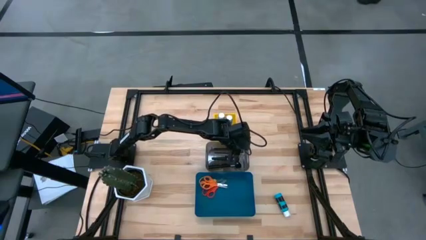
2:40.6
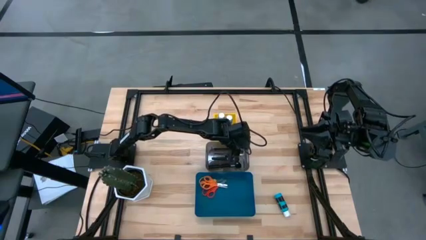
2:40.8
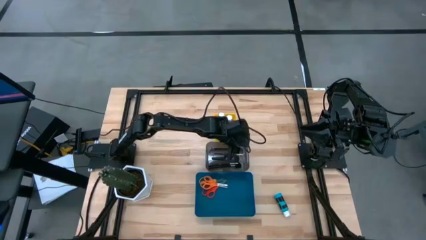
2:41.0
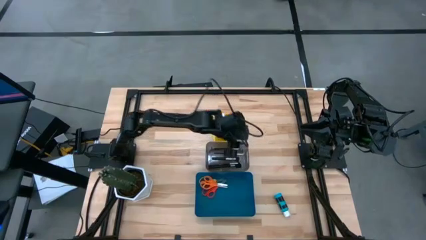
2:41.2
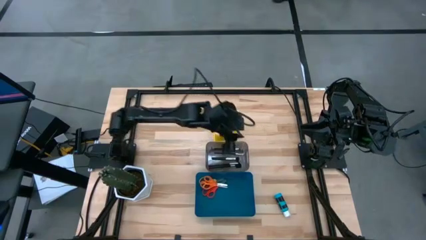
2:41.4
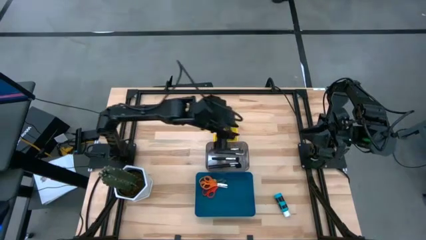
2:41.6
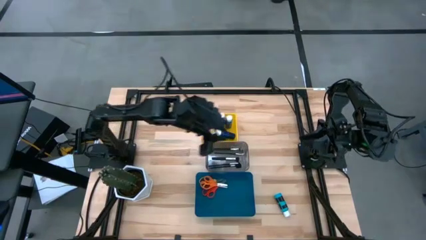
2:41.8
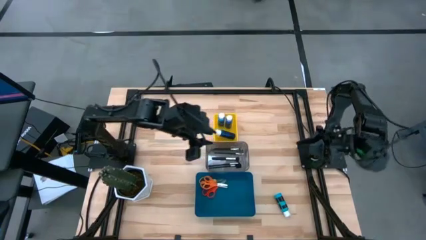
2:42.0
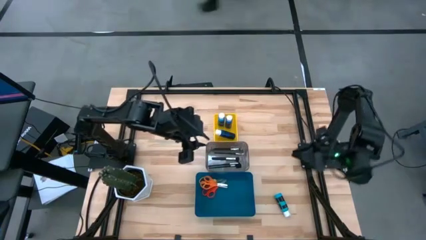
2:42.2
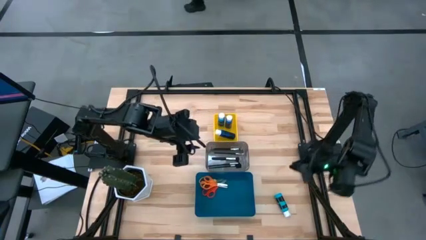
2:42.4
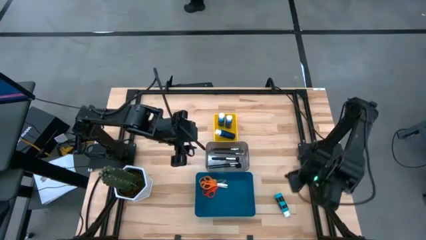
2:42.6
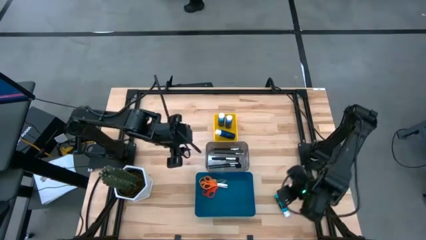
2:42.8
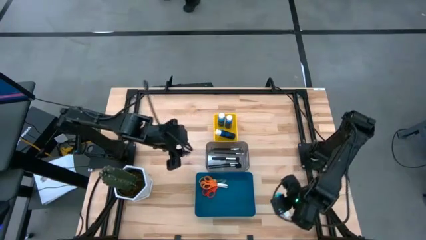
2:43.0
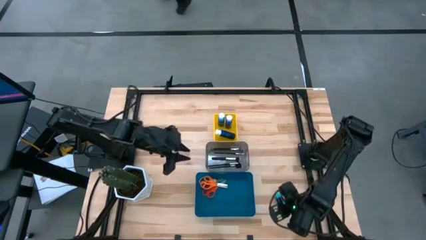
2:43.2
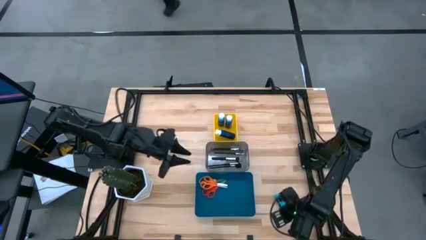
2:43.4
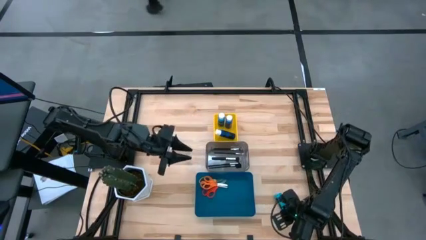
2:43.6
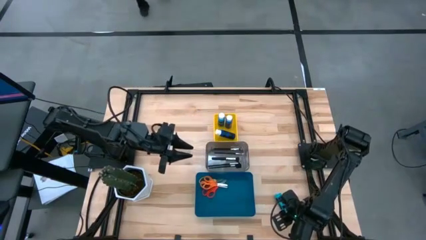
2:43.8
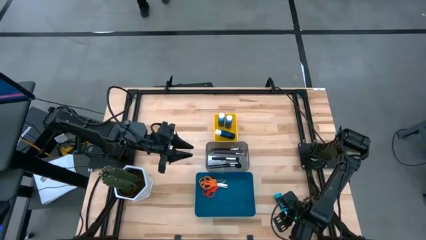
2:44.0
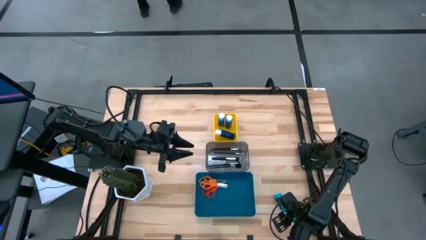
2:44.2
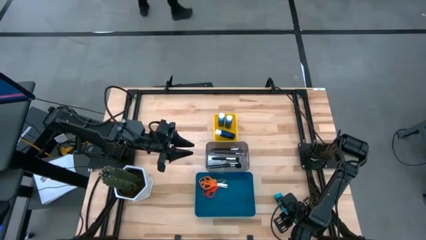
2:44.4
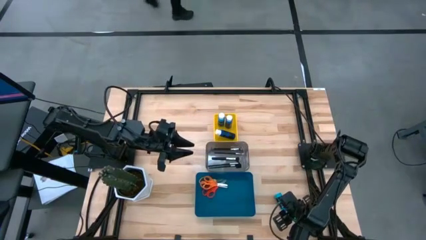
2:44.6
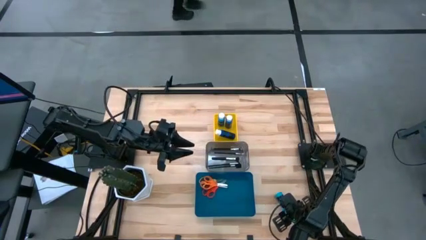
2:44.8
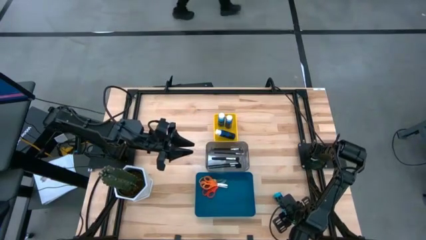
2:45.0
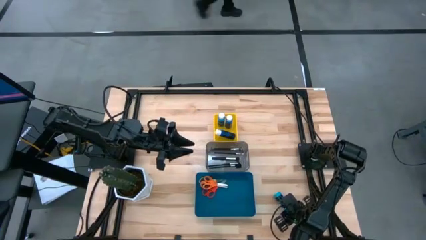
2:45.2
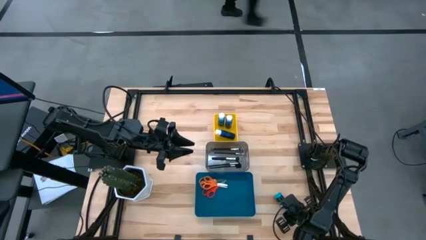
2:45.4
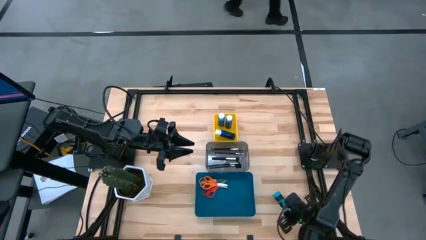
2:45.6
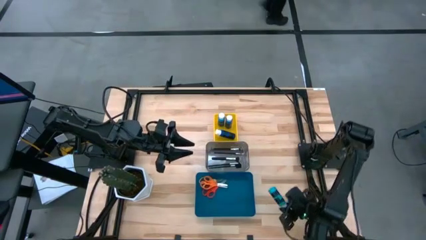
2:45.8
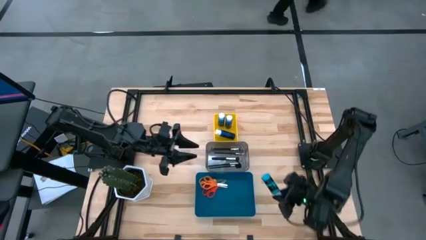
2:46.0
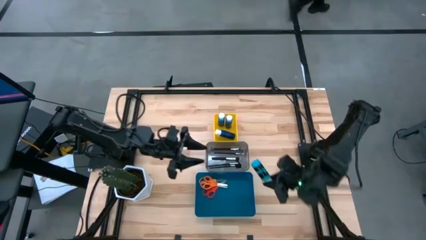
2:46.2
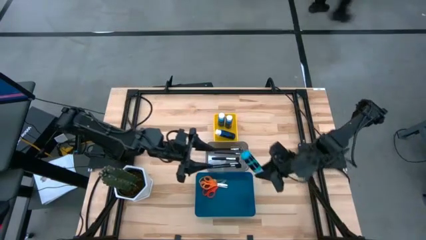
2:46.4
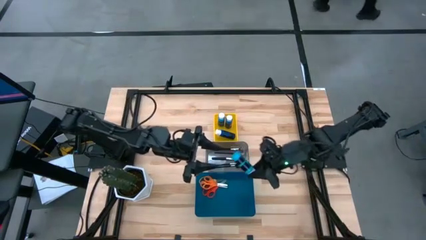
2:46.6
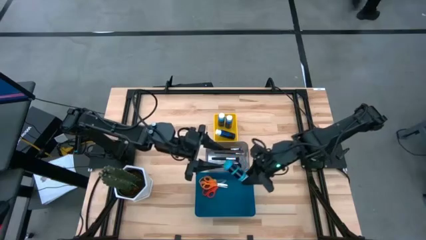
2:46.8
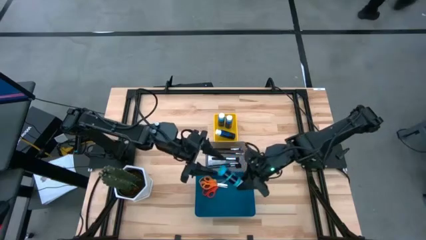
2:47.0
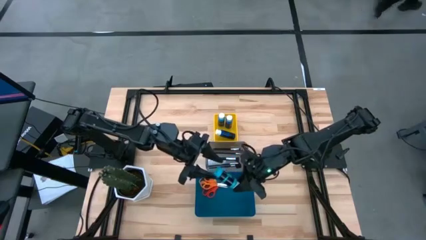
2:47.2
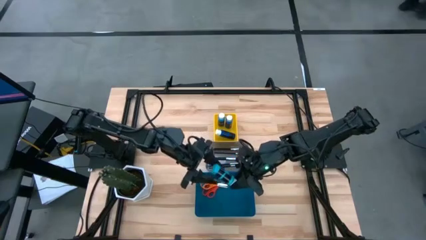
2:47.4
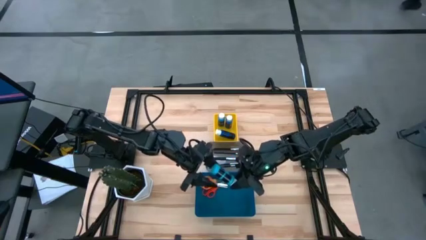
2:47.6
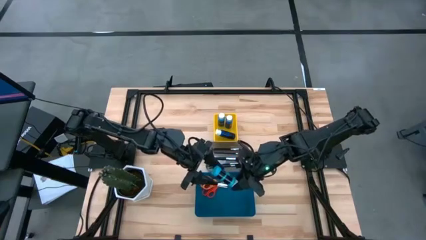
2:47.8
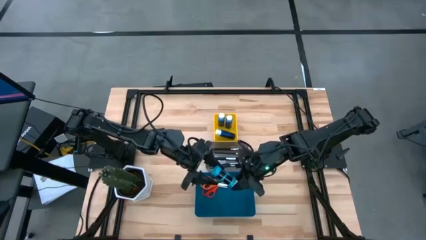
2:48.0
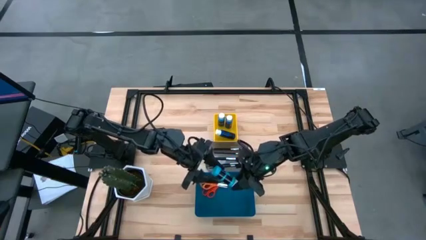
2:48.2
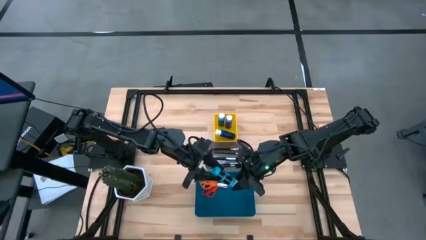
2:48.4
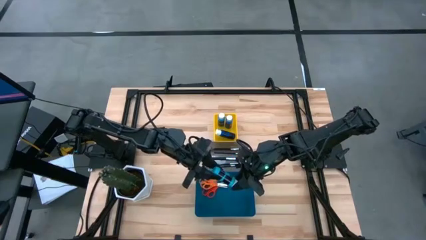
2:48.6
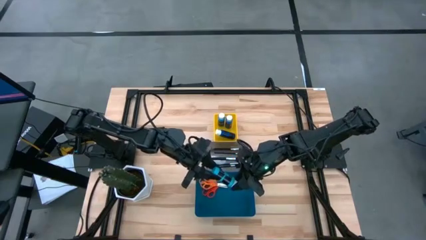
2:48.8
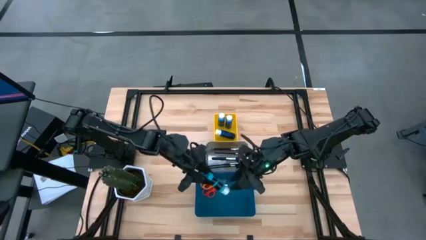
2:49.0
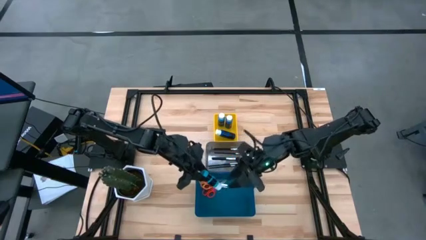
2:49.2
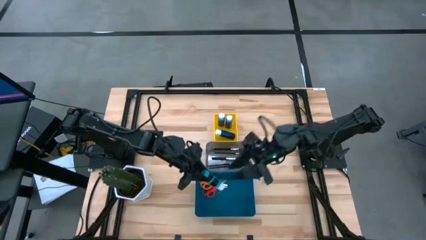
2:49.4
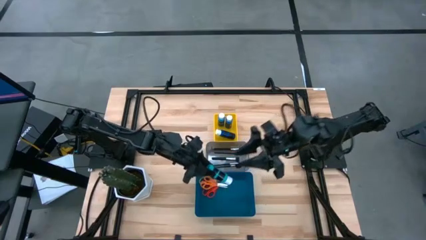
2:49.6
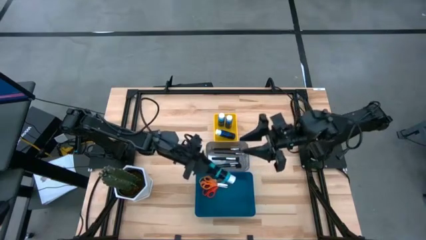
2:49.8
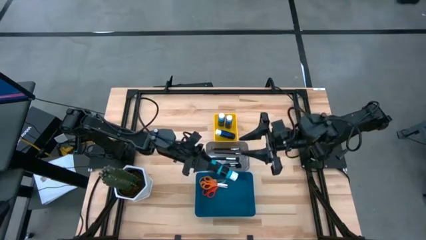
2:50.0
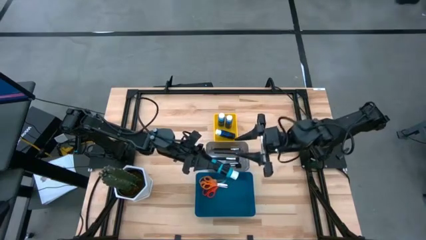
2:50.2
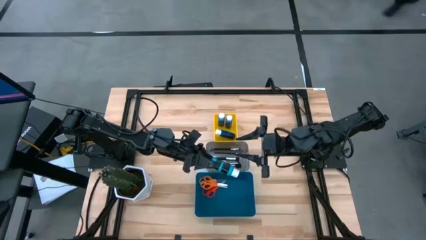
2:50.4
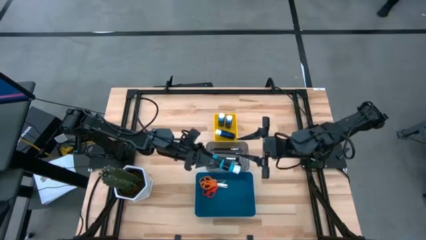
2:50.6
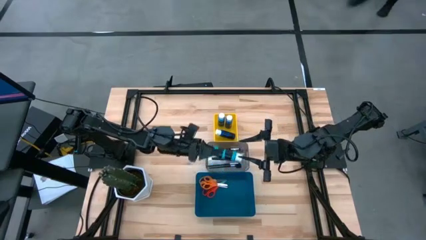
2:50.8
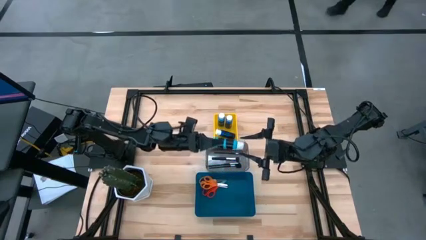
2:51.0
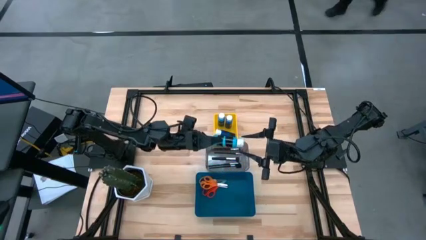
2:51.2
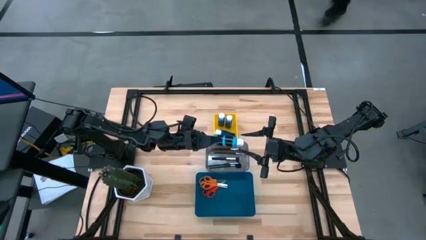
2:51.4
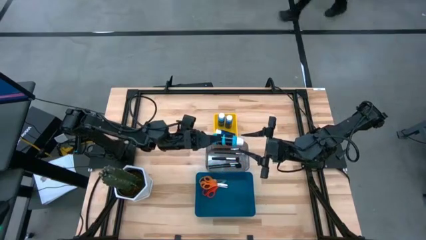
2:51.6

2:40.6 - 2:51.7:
Task: Pick & Place Paint Supplies
Put the blue paint bottle into the yellow bin
